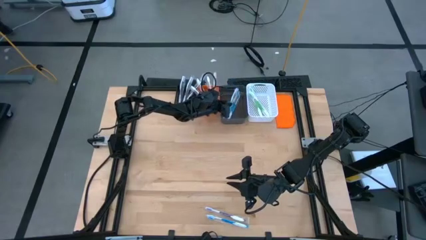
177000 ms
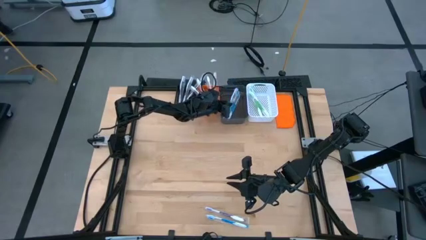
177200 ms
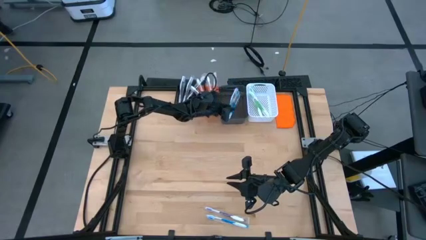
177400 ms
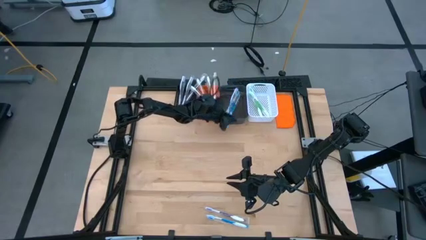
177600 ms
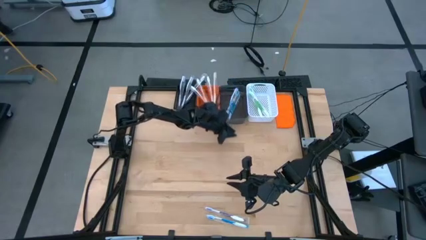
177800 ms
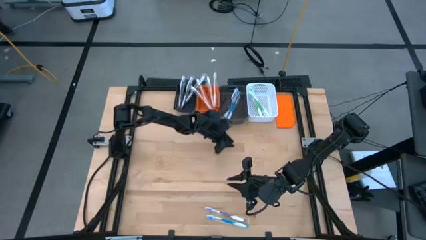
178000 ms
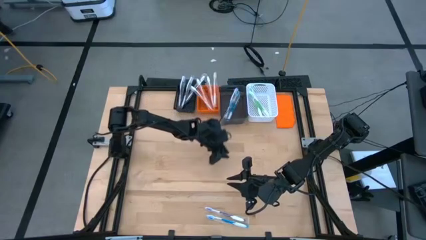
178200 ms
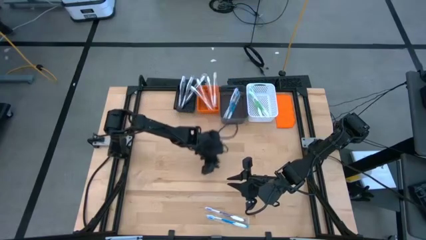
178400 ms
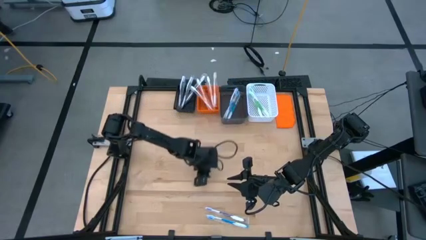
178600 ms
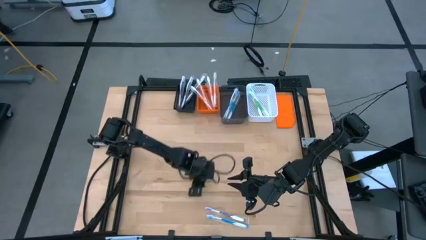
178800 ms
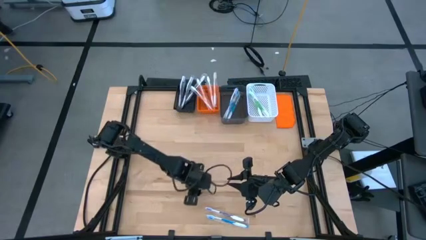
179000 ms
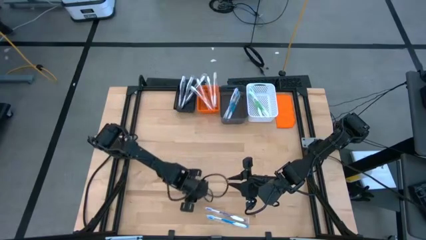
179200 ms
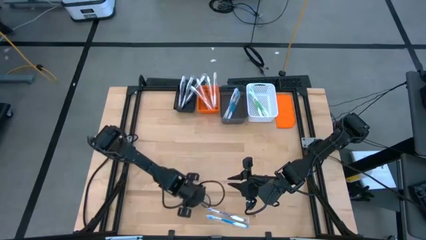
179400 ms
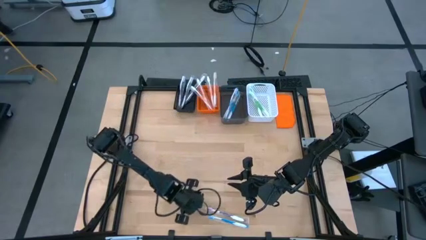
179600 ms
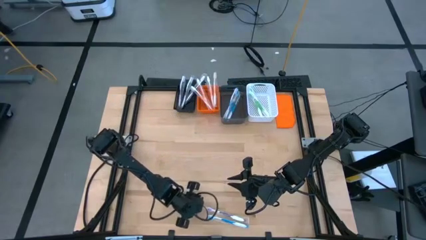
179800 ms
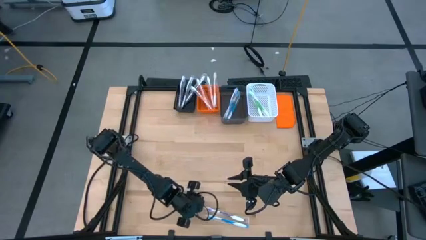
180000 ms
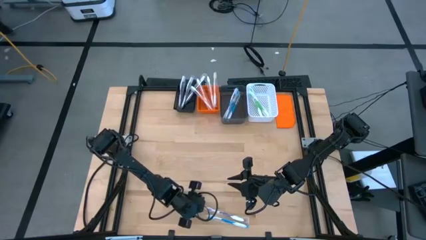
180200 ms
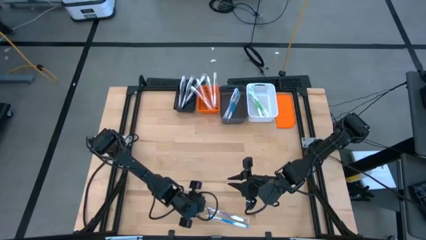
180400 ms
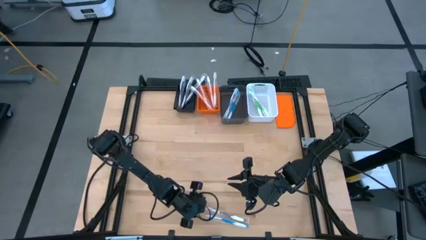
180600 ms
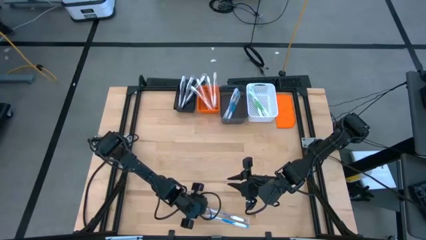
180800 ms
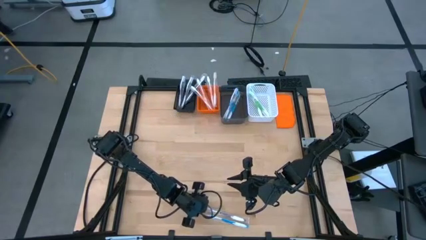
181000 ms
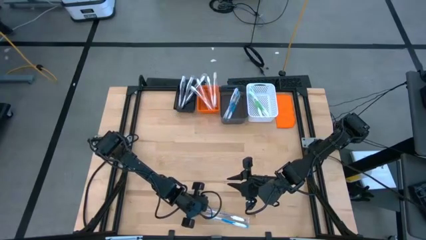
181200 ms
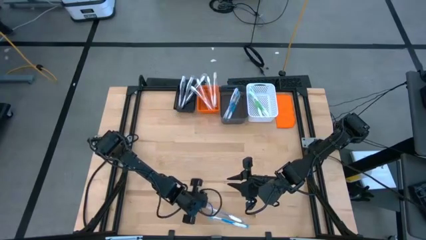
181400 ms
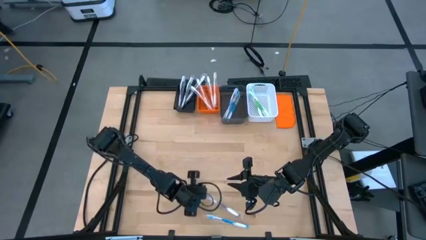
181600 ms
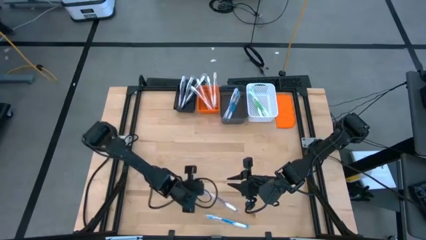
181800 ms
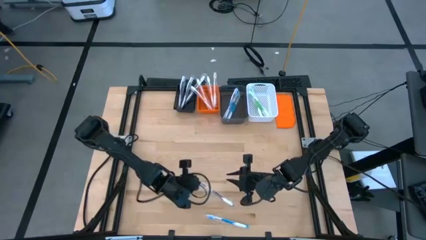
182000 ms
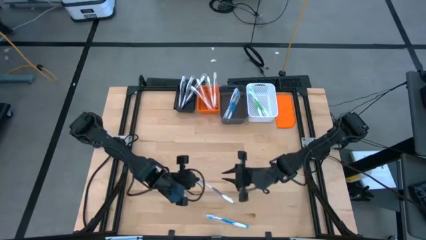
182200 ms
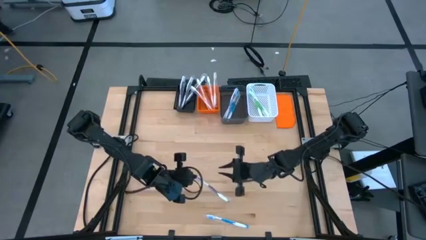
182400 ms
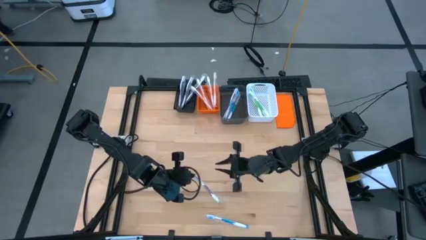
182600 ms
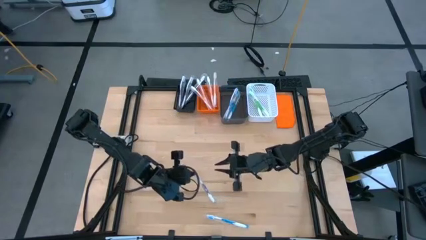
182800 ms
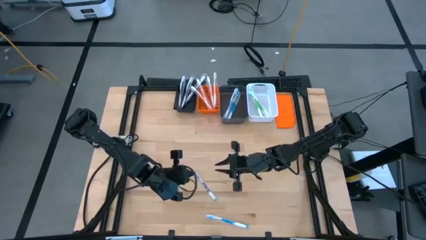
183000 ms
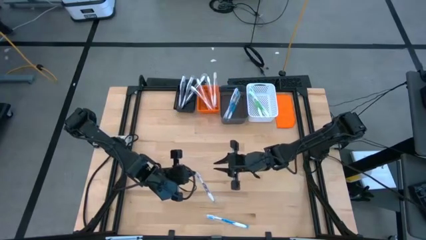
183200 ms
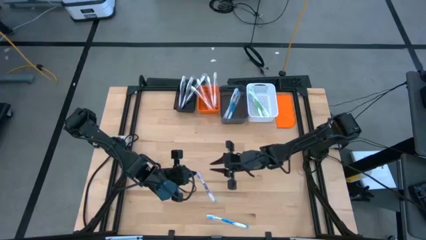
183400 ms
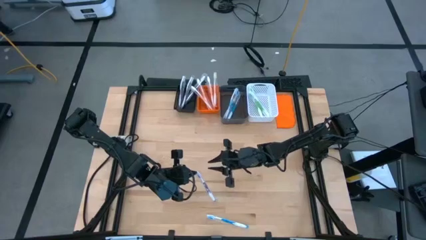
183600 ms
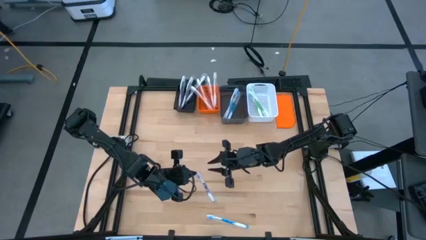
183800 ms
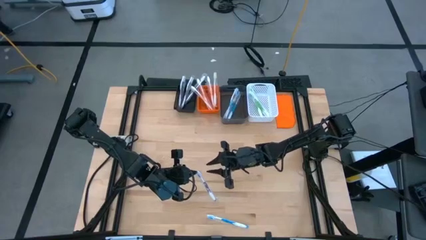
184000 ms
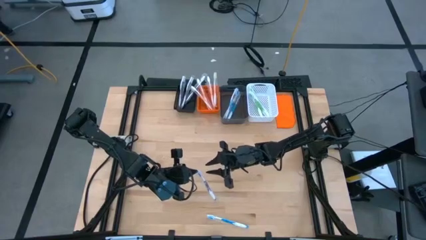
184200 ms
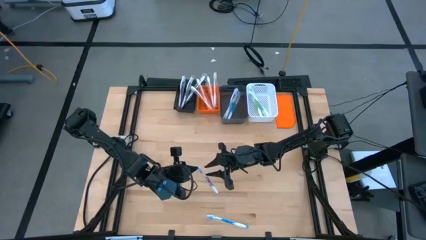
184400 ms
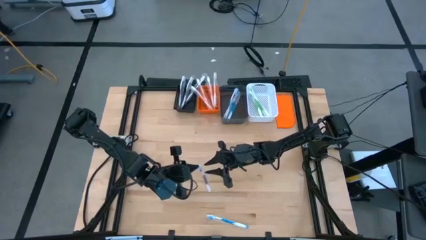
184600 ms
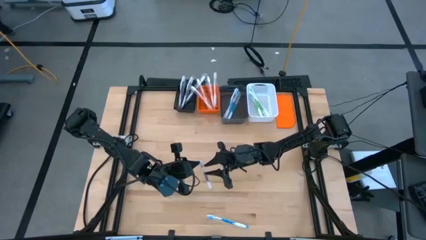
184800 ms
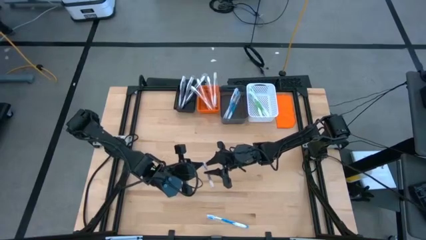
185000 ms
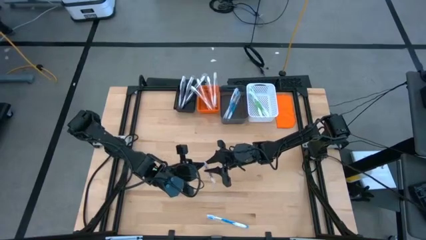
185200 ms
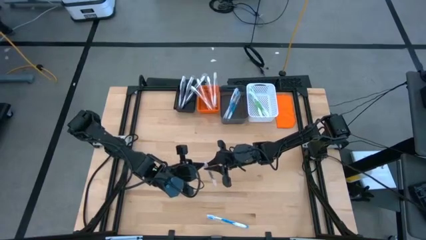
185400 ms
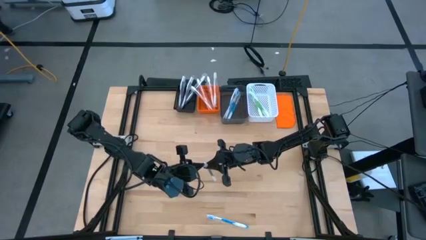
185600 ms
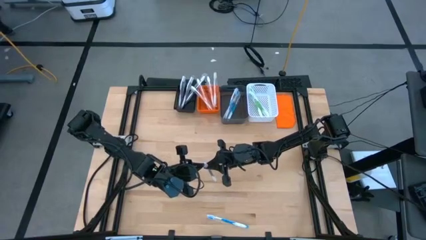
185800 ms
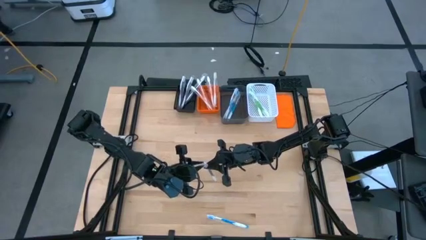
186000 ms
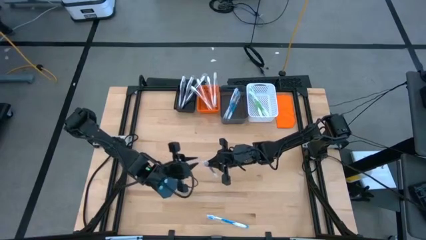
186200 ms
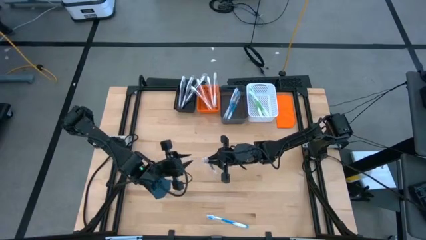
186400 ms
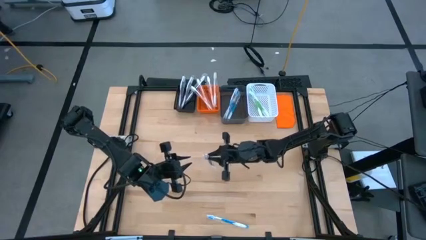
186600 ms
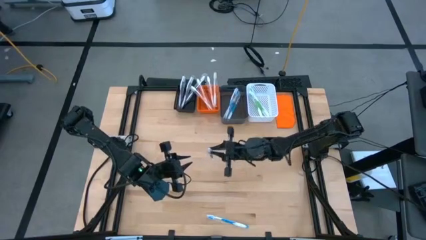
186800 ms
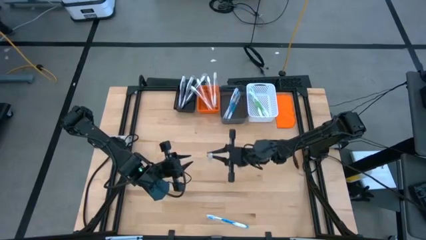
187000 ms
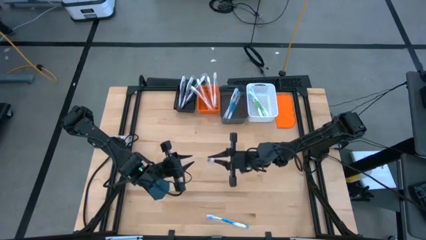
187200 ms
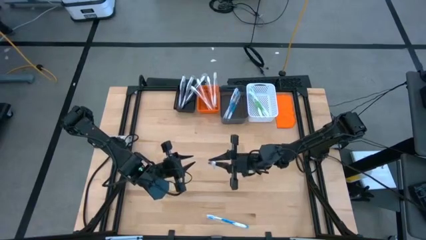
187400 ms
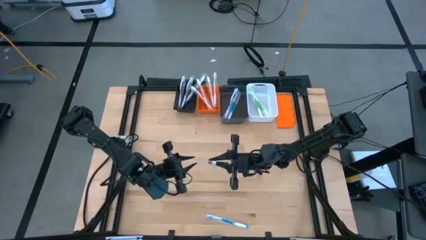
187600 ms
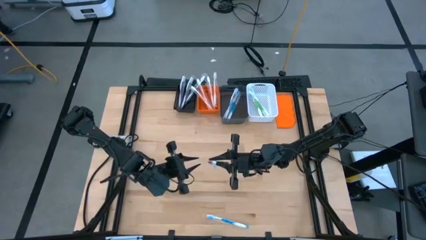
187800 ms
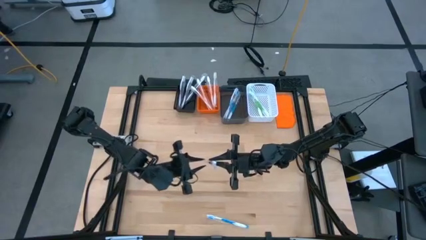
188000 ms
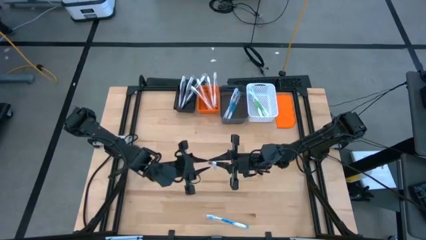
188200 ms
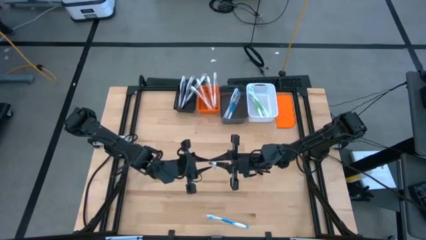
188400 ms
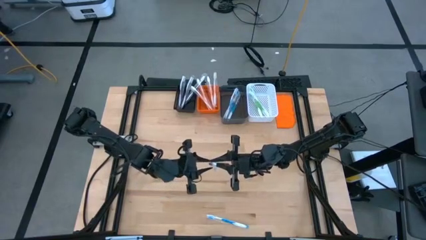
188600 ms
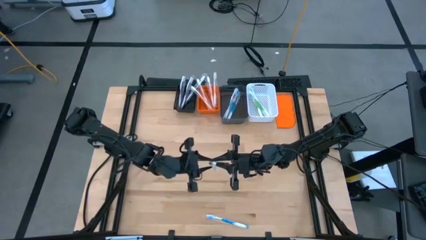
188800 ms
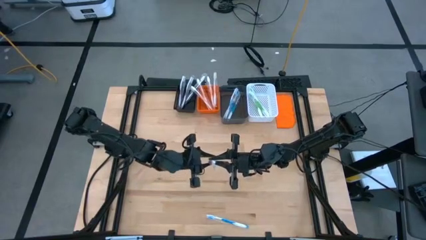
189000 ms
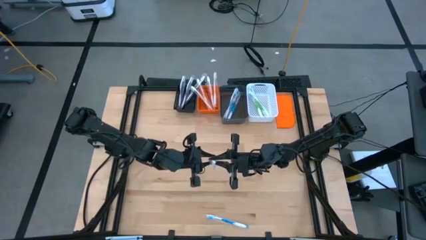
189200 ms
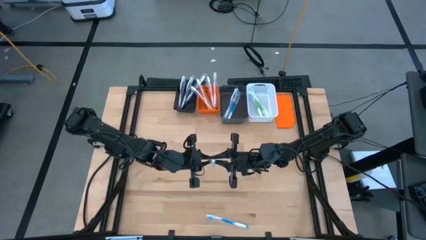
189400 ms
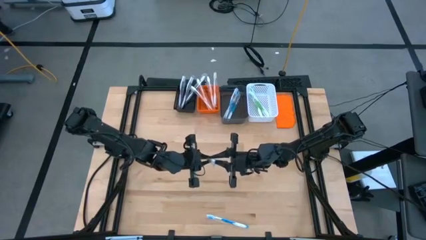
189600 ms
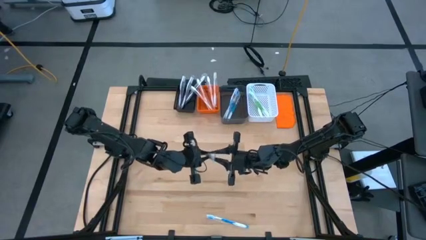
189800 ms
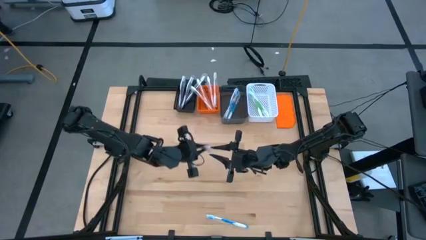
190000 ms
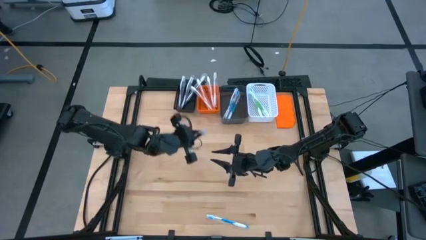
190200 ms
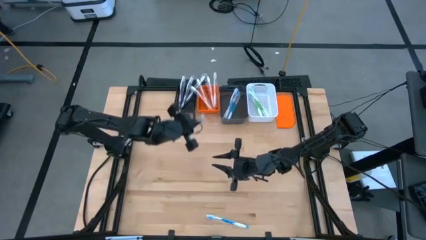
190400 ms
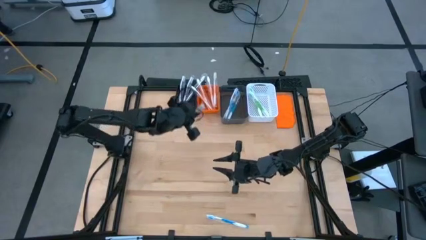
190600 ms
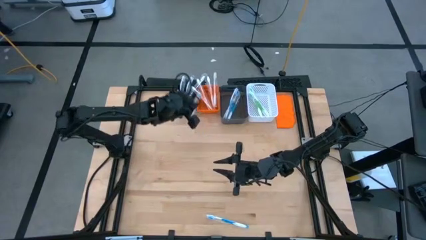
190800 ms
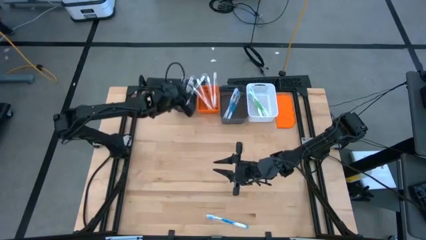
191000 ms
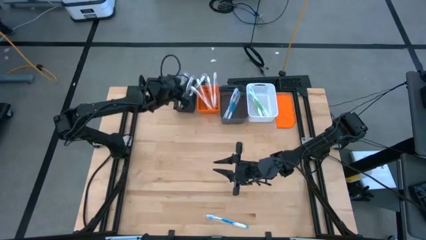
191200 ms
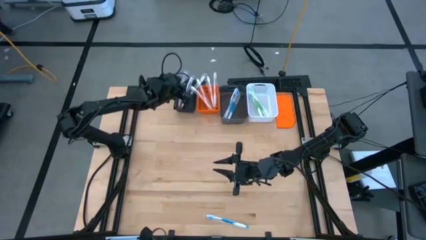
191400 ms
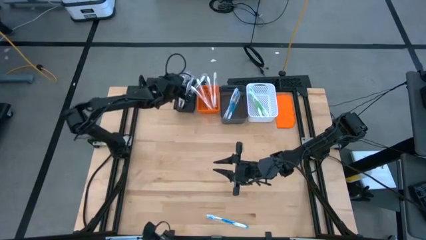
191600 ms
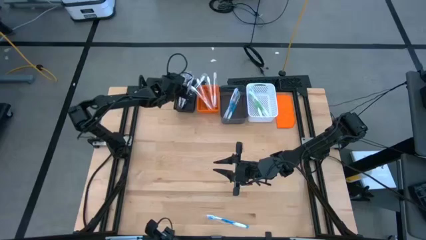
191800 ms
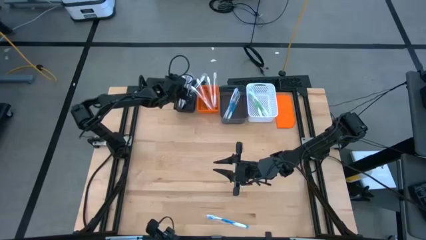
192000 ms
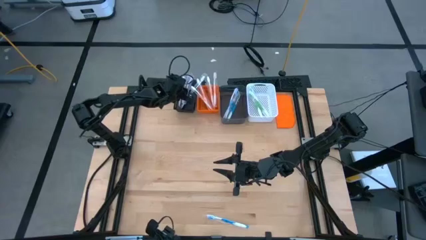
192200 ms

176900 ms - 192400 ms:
Task: Pick & Place Toothbrushes
Put the purple toothbrush into the black basket

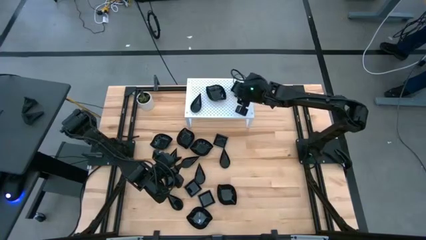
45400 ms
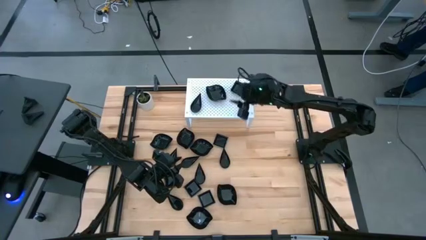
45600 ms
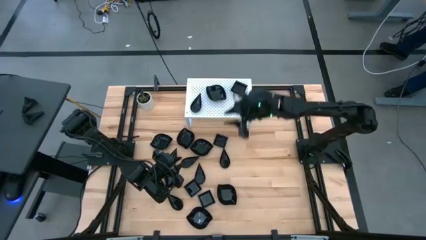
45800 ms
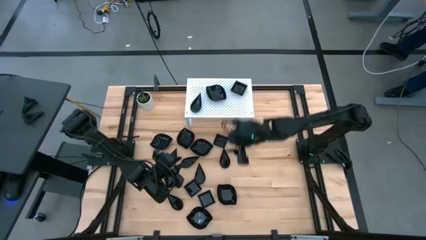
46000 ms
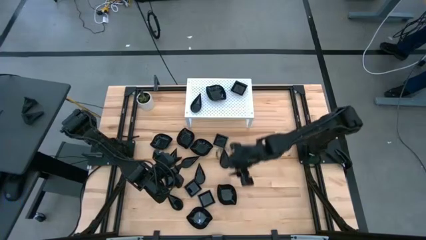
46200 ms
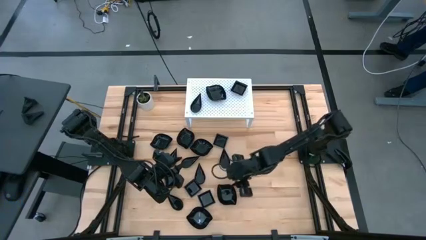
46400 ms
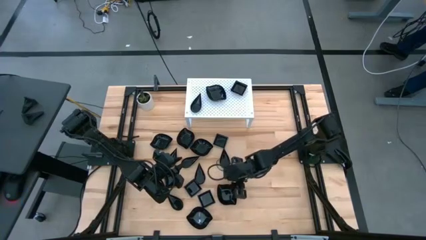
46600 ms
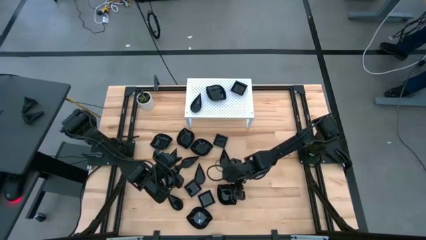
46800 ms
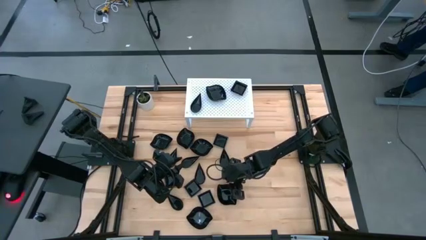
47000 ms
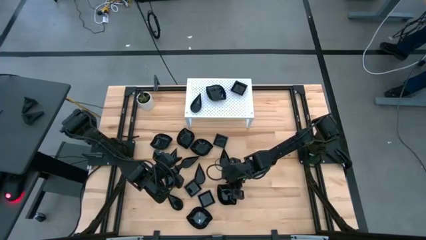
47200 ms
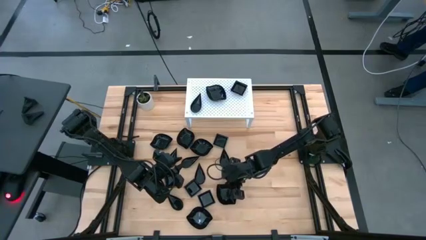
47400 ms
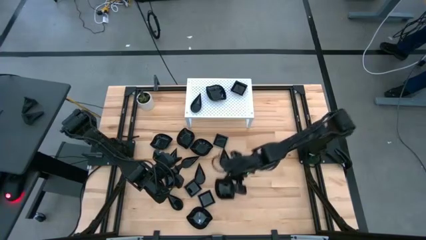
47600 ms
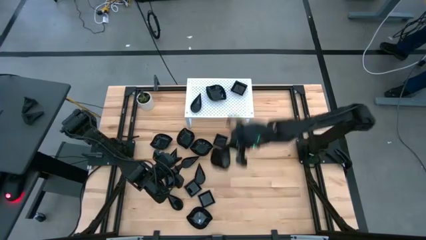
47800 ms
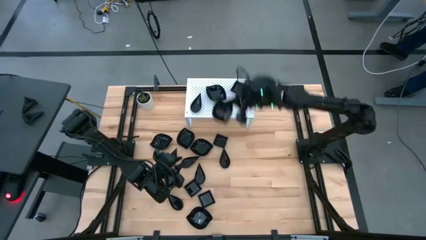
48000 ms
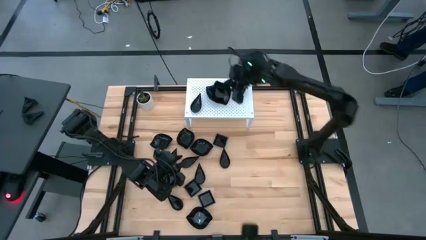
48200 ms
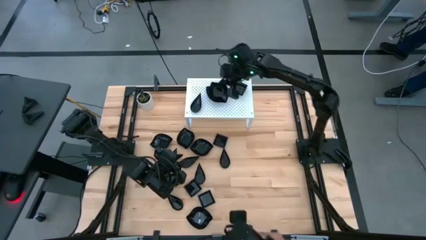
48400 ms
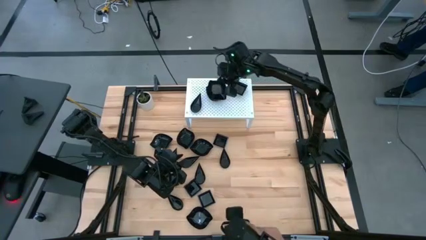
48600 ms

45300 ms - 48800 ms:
Task: Pick & Place Mini shaped plates
Stack the black leaf-shaped plate on top of the other black leaf-shaped plate on the shelf
